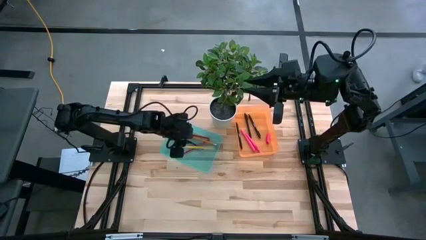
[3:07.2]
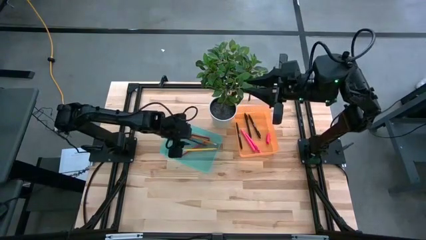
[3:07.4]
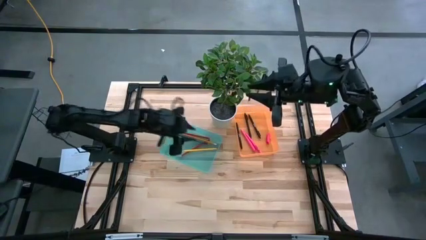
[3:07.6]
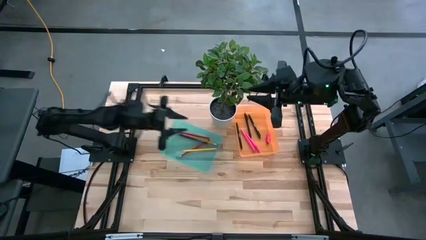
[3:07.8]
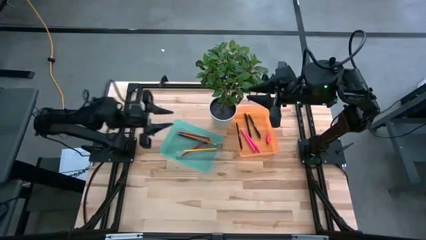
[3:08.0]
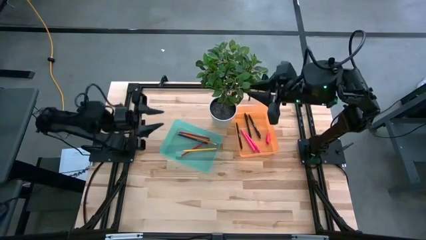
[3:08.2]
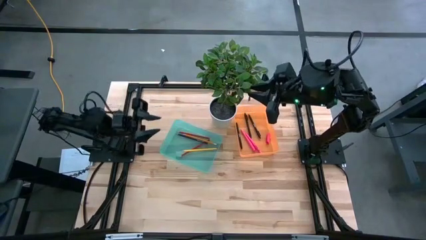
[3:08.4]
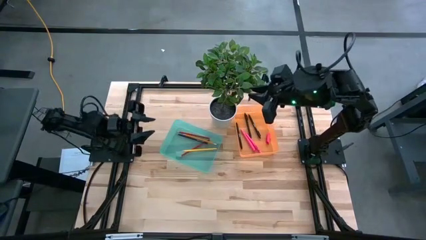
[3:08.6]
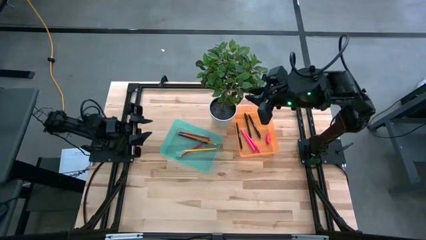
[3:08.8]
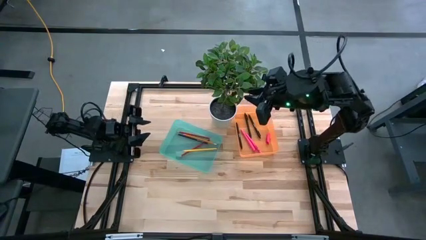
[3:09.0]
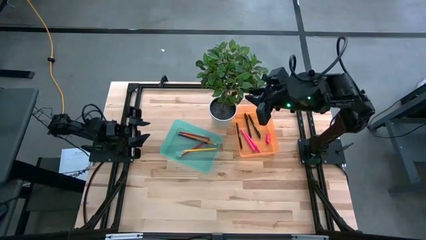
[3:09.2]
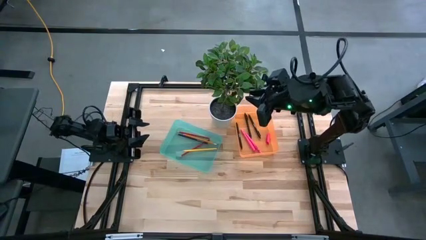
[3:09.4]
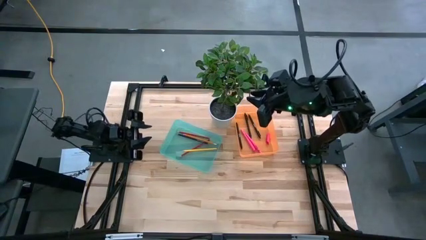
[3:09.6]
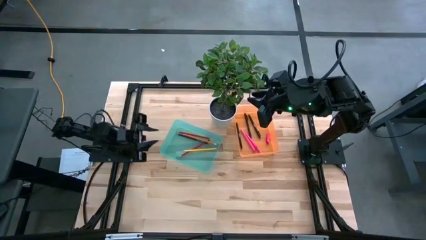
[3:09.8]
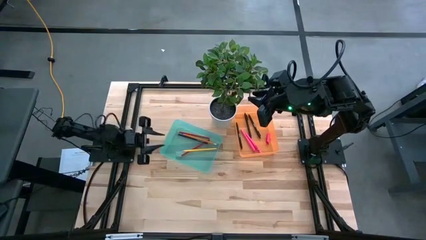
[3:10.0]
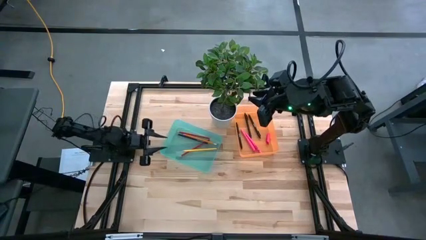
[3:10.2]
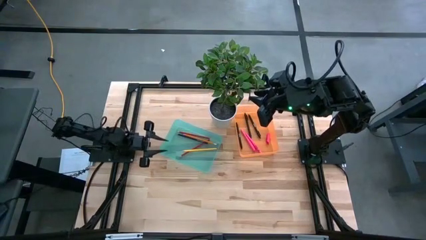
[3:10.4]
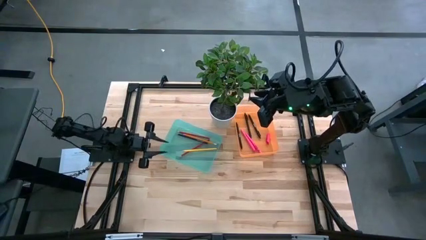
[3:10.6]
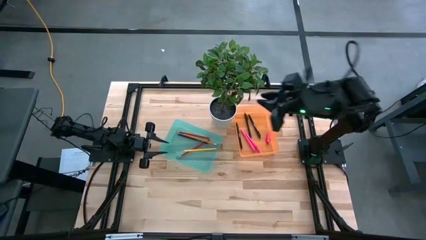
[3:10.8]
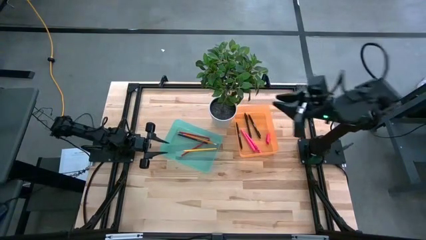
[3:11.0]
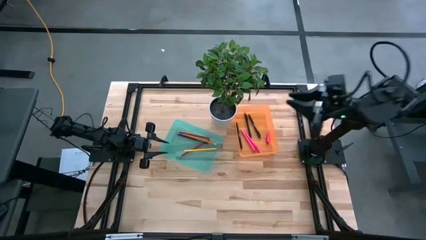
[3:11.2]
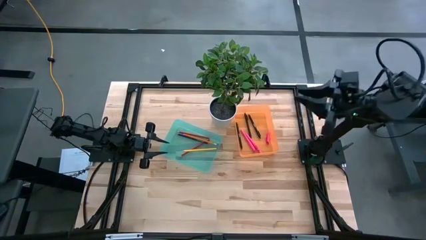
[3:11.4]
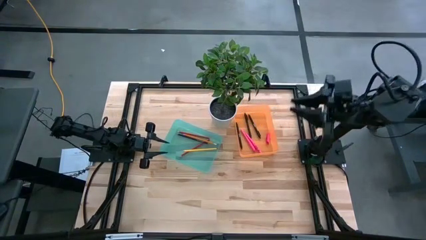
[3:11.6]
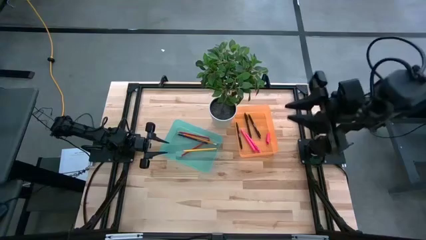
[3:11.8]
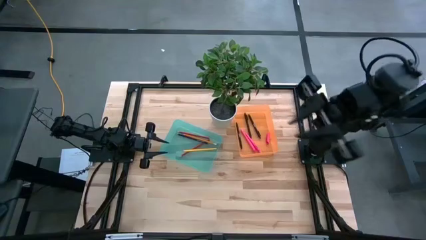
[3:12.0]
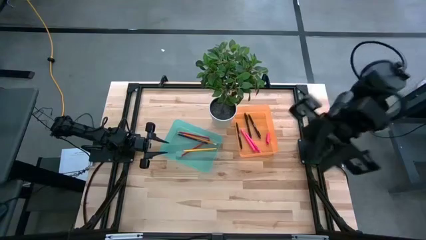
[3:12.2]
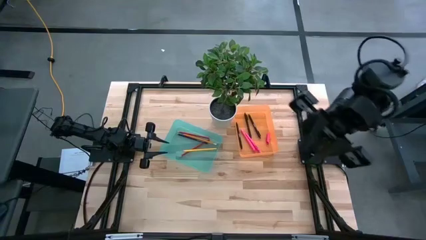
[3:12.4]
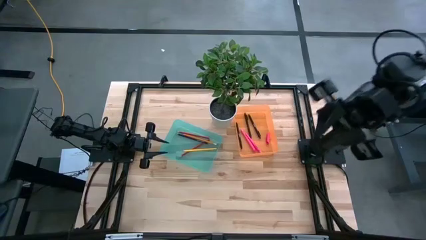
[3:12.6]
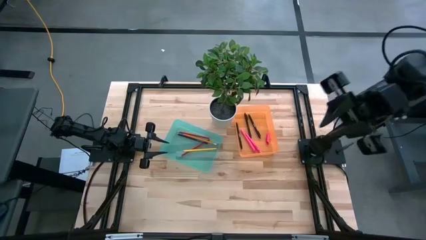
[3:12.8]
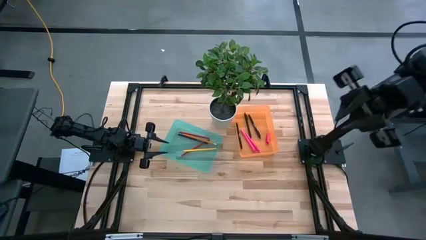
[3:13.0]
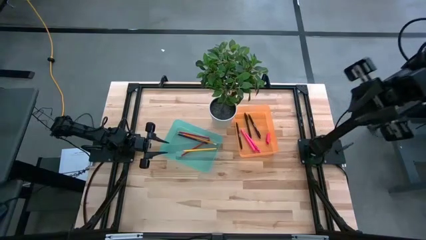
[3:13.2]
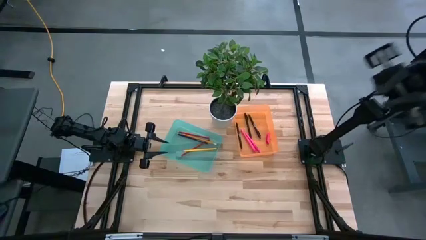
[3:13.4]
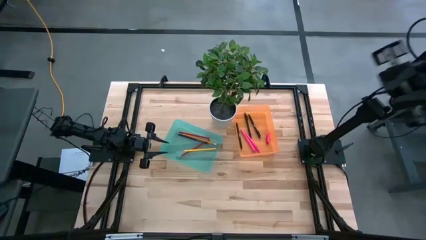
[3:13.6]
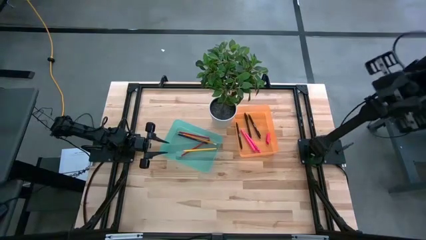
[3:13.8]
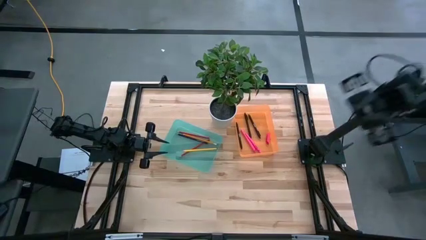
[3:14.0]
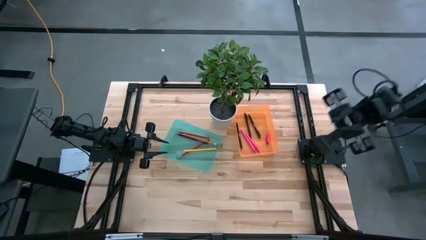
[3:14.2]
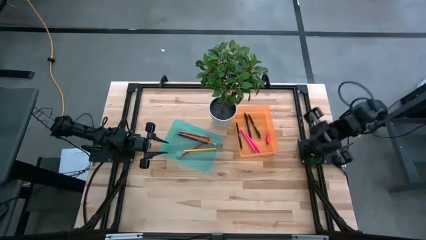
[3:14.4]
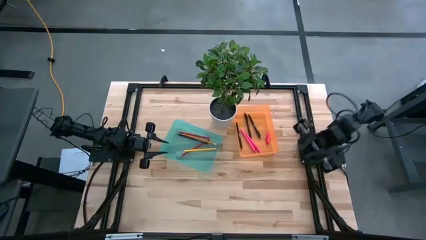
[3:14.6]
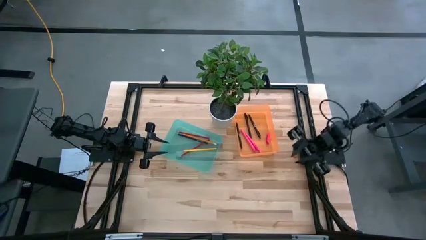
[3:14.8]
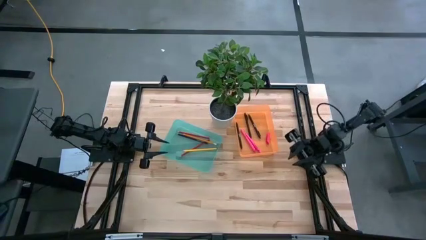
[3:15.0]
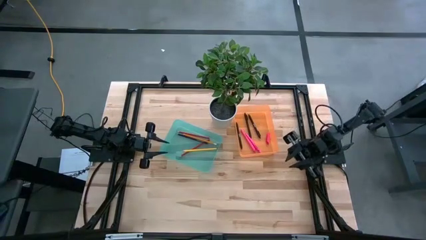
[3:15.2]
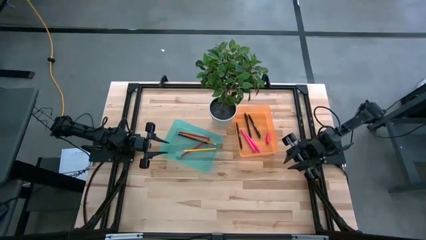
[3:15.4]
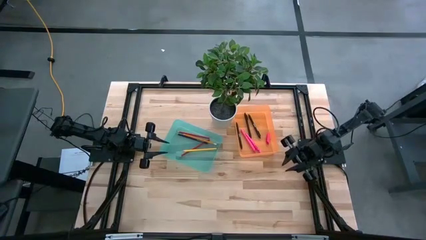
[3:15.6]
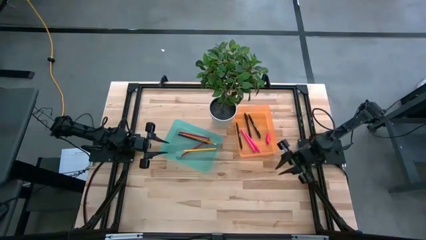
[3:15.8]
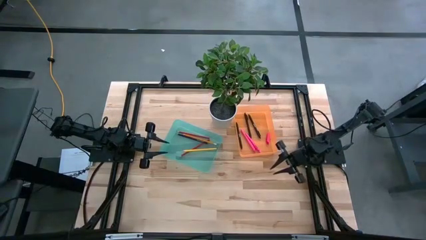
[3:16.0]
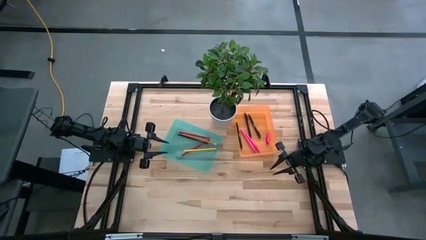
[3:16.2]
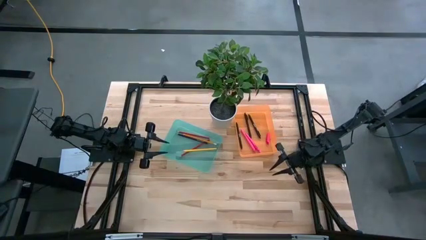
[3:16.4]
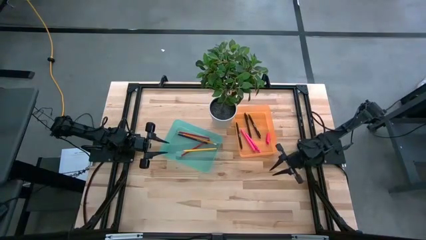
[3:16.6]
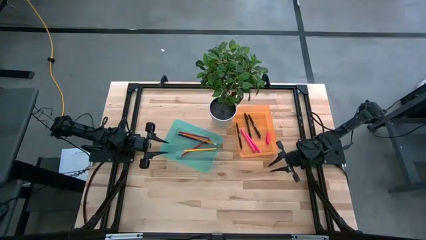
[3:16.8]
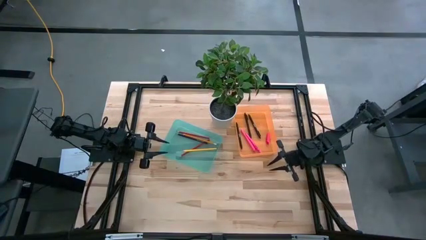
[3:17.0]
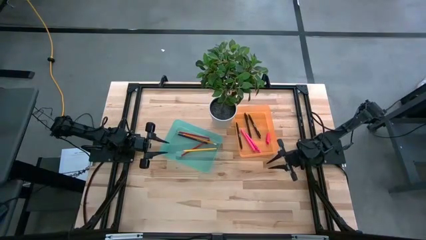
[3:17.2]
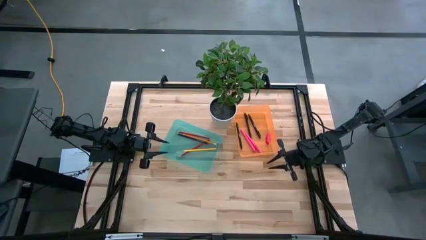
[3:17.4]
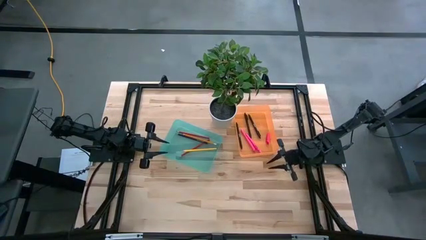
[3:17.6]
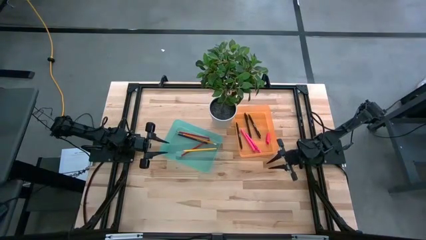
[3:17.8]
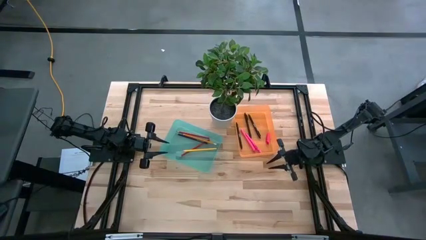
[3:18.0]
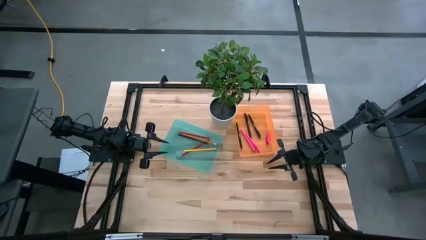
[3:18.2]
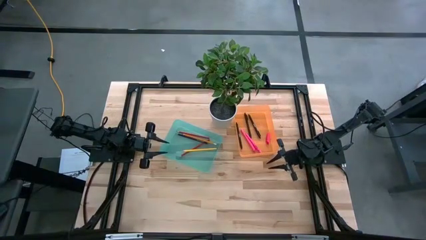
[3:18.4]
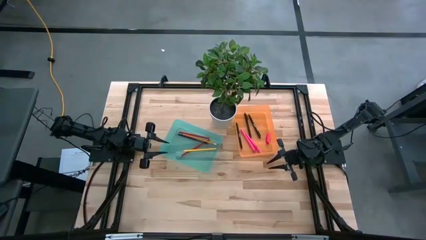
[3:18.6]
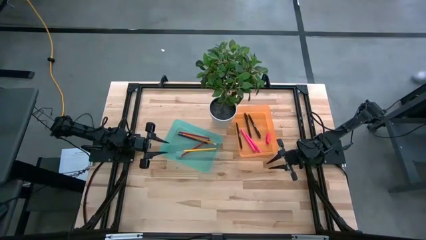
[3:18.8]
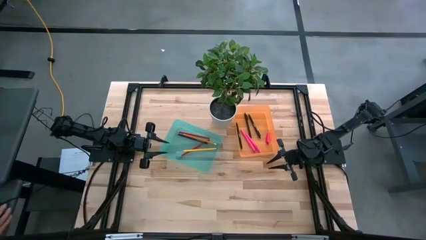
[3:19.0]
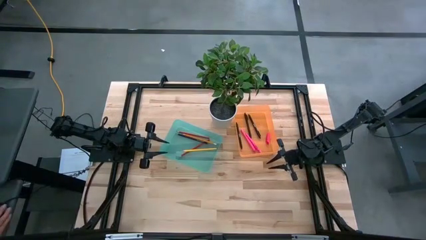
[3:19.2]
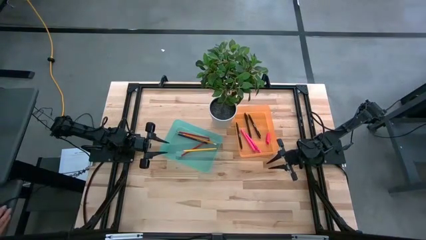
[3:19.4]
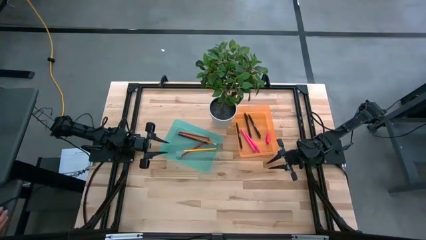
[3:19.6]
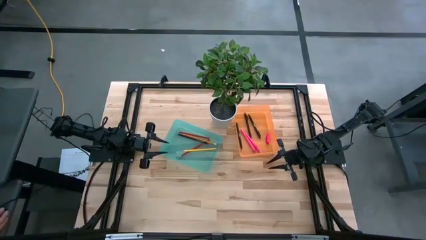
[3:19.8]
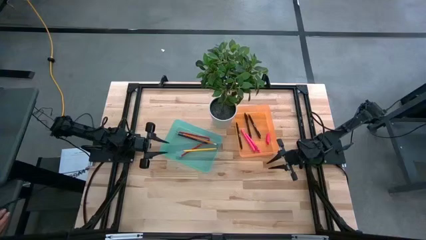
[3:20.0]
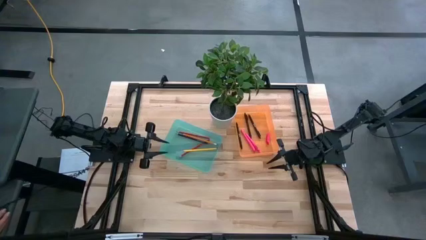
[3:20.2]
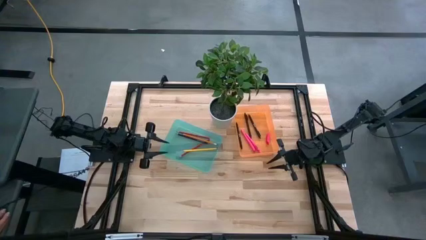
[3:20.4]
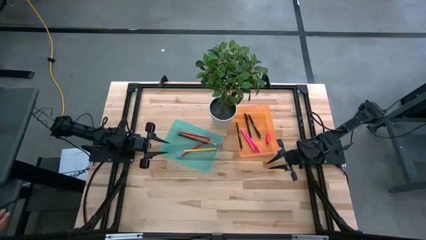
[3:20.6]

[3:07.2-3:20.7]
Task: Sort pens & pencils
Return to Home Position
